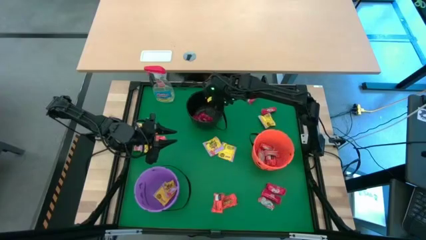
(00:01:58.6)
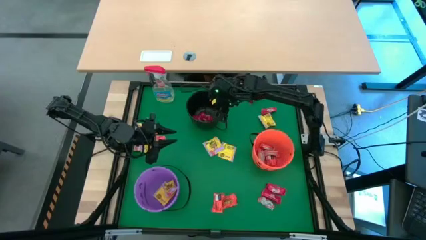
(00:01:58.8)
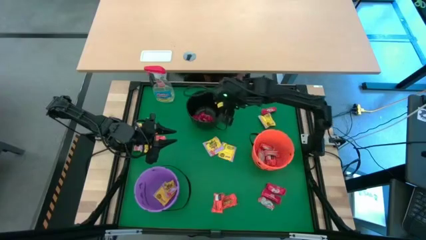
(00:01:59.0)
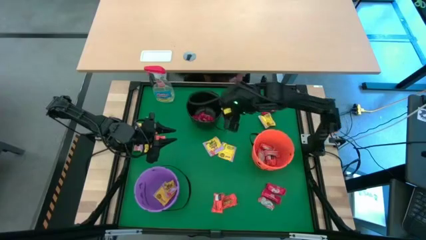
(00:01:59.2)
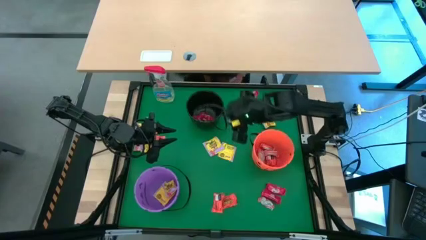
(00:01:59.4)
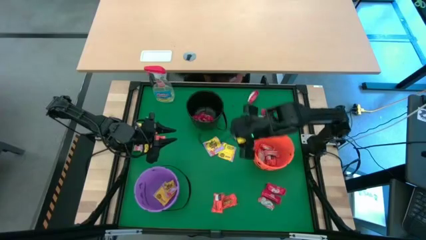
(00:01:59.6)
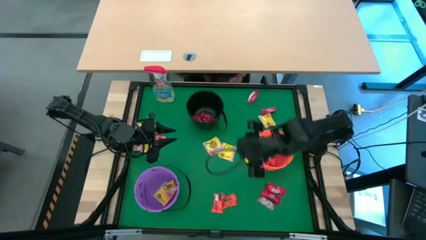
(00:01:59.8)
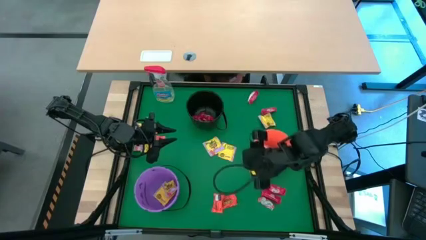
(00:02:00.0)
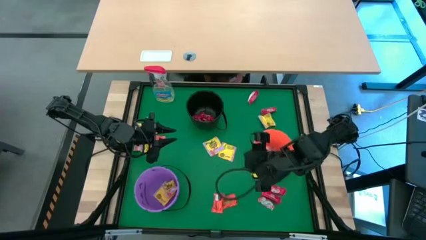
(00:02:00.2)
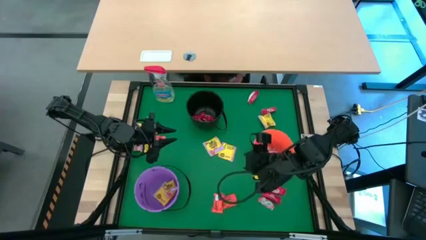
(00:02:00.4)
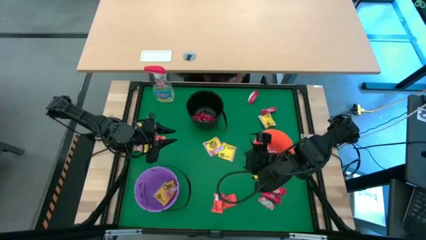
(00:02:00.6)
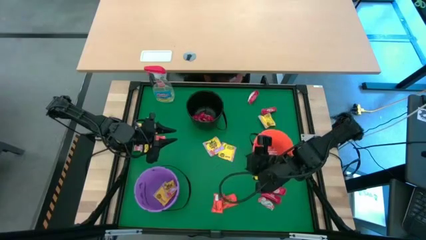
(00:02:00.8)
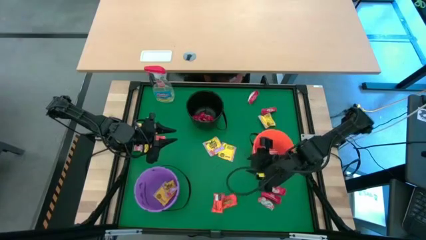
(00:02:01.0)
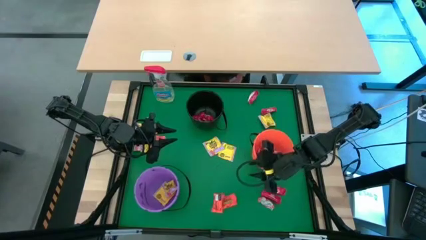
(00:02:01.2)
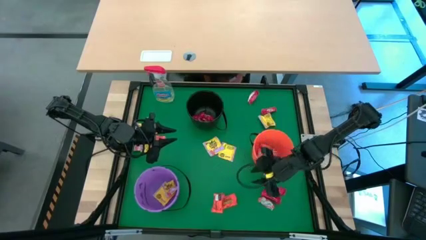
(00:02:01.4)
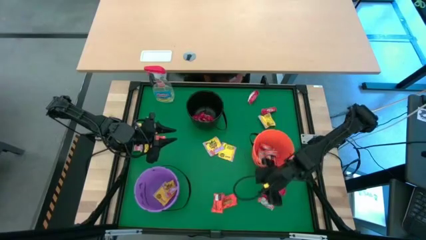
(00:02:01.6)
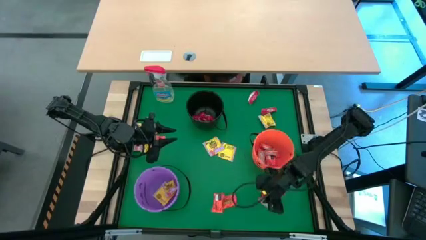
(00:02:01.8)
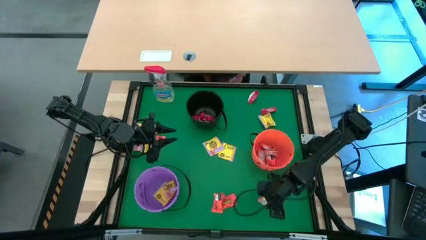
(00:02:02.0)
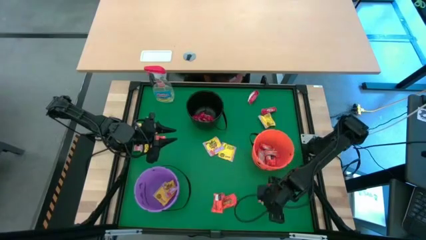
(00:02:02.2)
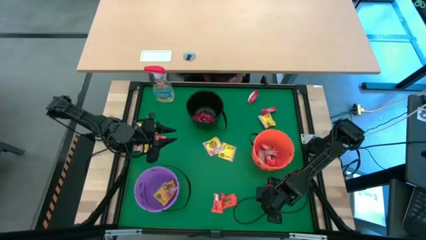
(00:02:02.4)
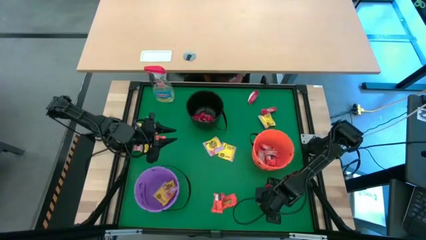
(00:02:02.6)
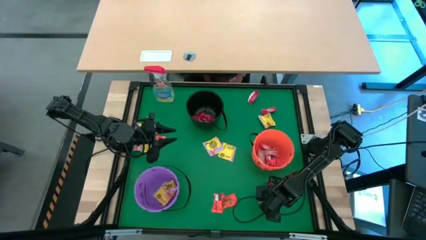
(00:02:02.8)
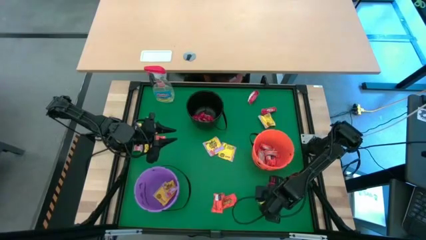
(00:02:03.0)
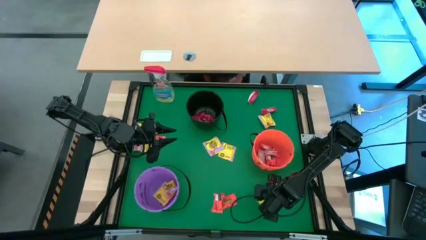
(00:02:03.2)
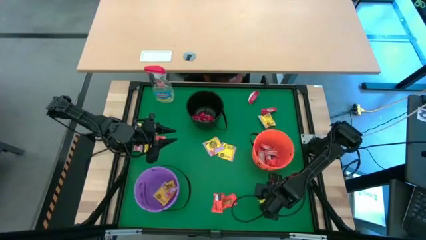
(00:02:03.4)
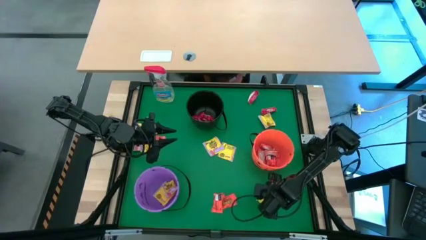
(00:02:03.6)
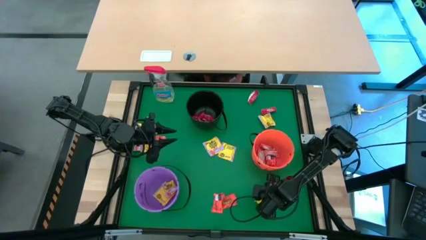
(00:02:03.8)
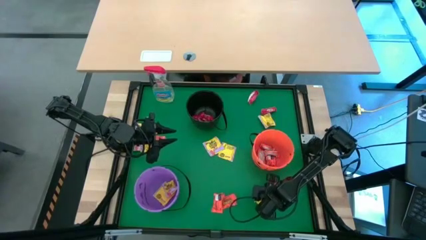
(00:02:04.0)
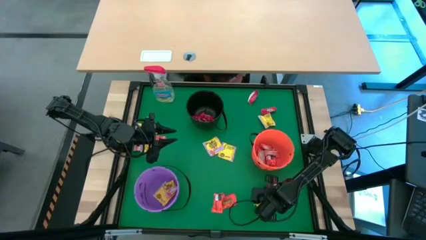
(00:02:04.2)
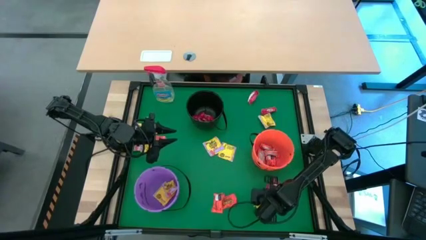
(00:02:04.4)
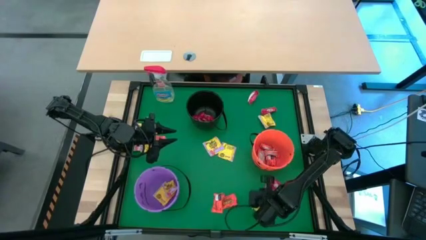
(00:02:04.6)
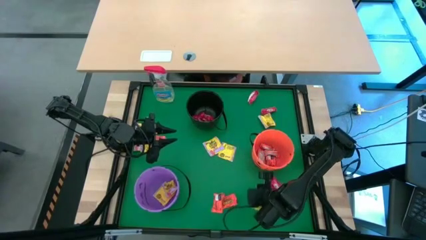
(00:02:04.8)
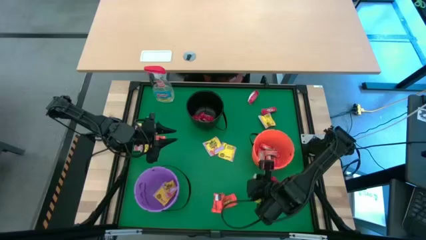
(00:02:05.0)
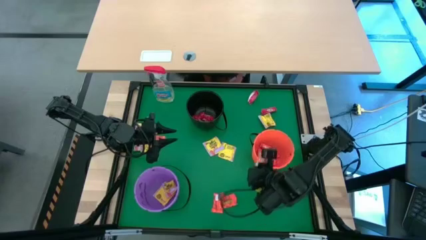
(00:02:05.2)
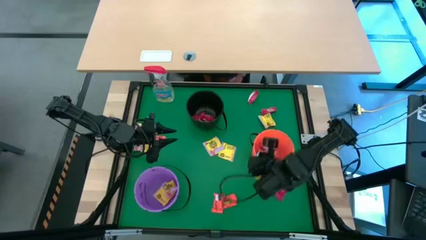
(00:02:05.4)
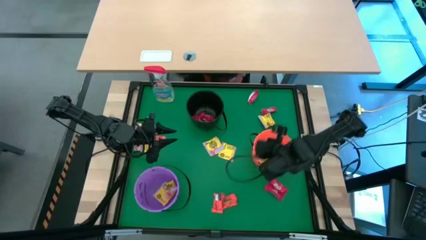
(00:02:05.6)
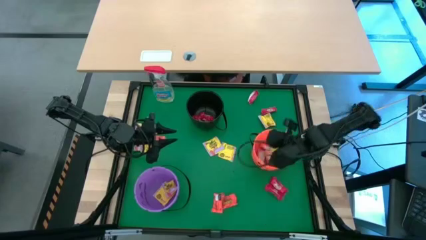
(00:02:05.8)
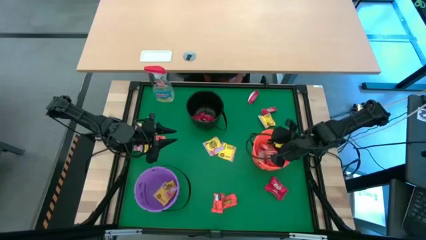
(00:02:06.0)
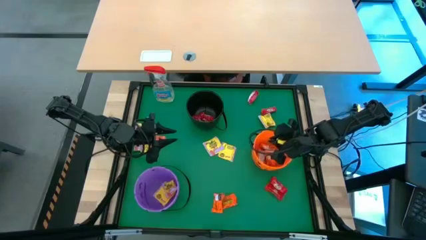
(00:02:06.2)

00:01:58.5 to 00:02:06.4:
Task: Sort candy
Put the orange candy into the orange bucket

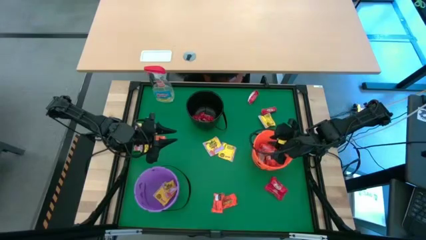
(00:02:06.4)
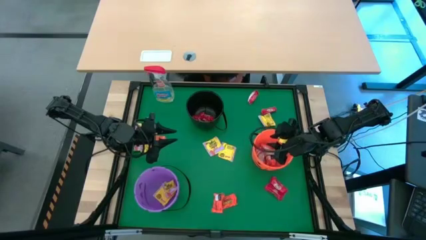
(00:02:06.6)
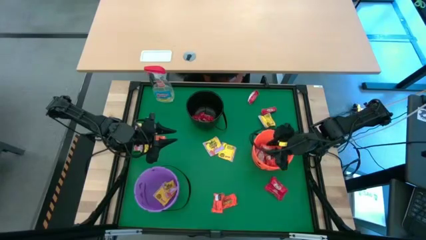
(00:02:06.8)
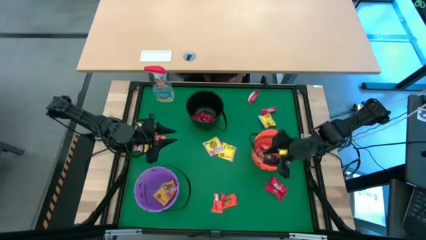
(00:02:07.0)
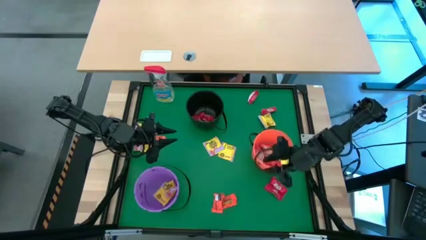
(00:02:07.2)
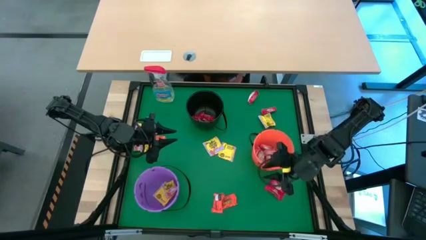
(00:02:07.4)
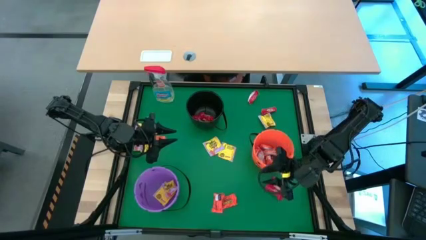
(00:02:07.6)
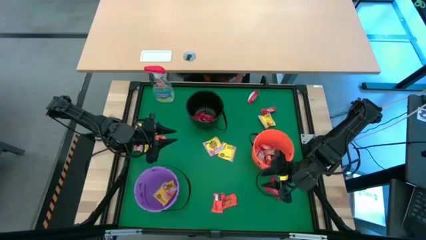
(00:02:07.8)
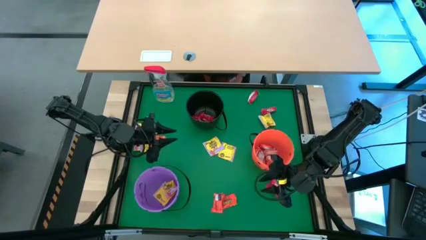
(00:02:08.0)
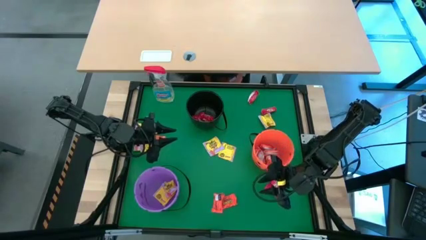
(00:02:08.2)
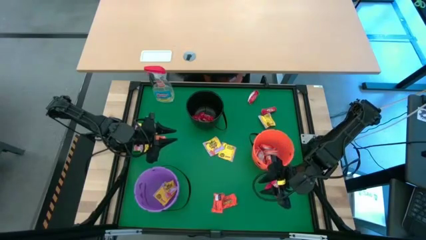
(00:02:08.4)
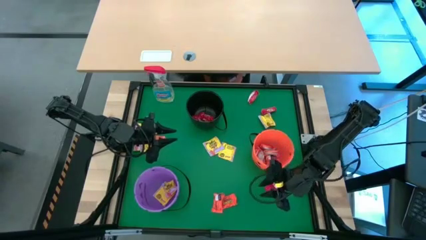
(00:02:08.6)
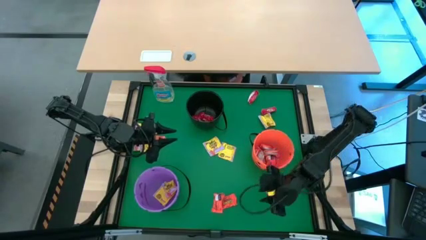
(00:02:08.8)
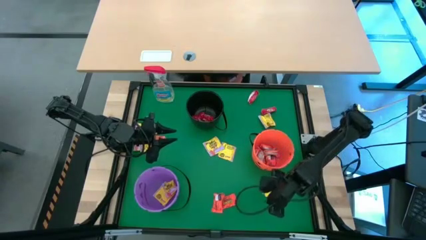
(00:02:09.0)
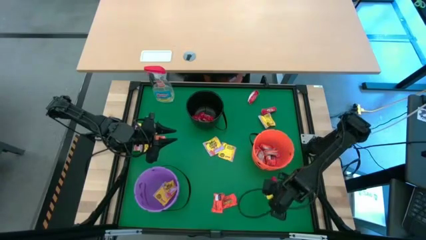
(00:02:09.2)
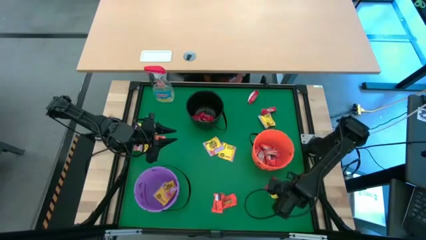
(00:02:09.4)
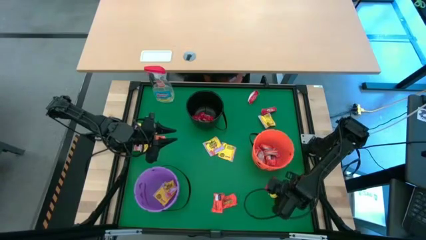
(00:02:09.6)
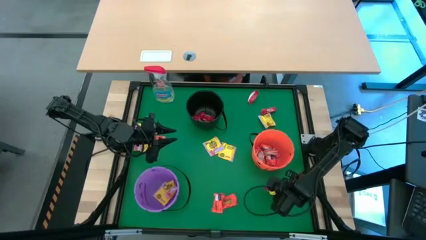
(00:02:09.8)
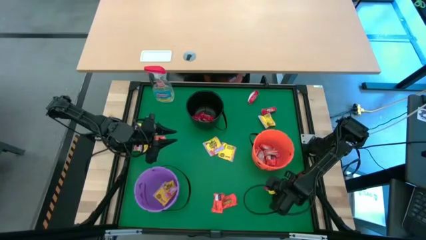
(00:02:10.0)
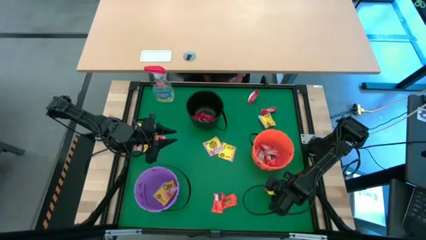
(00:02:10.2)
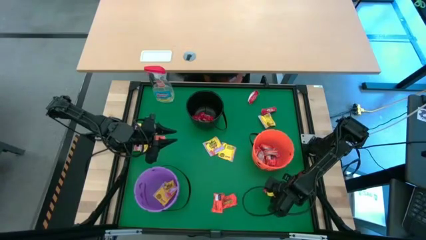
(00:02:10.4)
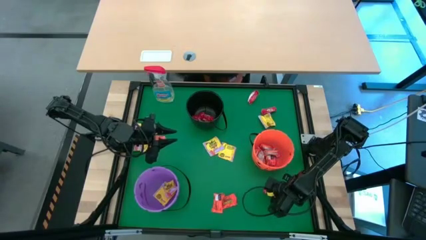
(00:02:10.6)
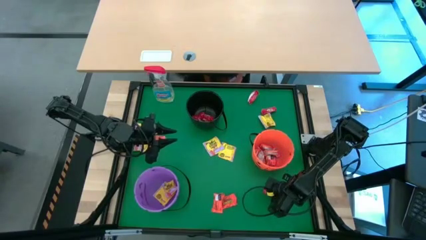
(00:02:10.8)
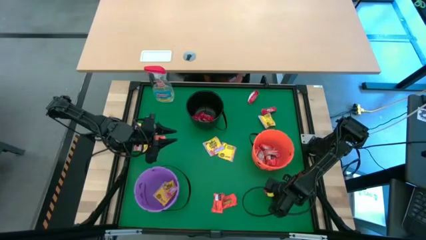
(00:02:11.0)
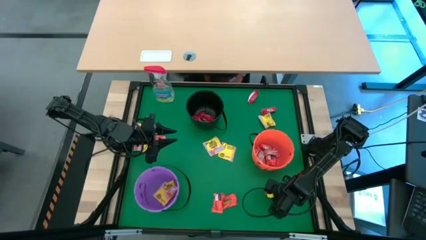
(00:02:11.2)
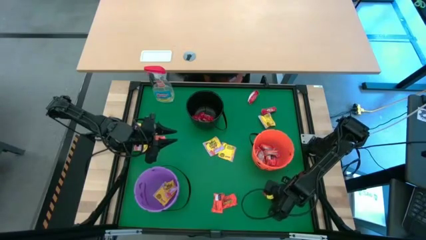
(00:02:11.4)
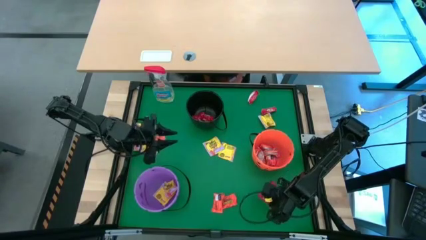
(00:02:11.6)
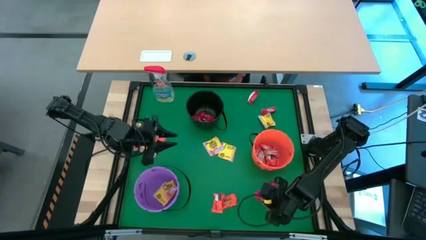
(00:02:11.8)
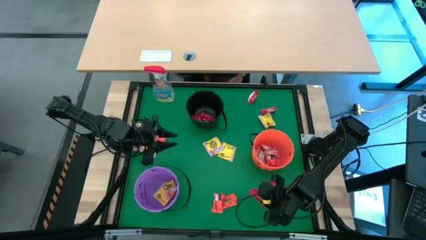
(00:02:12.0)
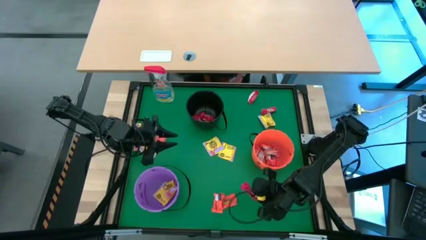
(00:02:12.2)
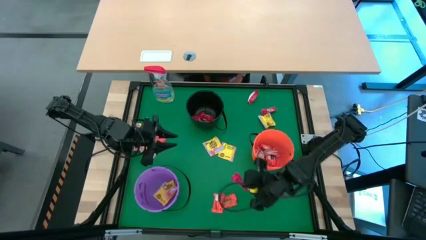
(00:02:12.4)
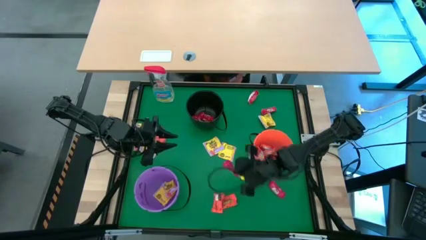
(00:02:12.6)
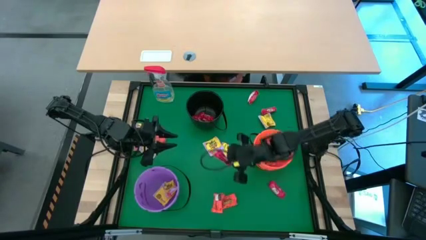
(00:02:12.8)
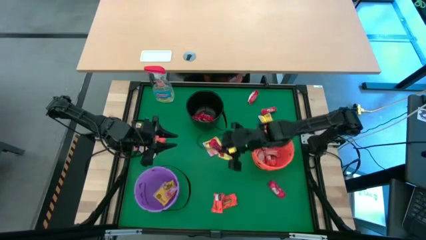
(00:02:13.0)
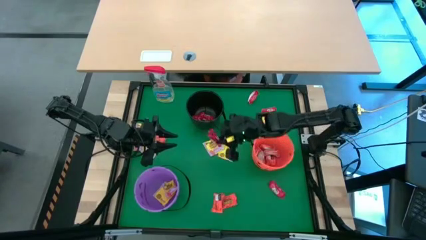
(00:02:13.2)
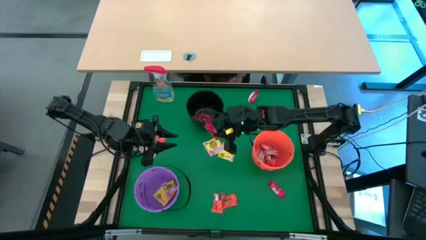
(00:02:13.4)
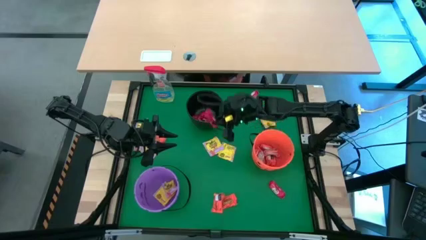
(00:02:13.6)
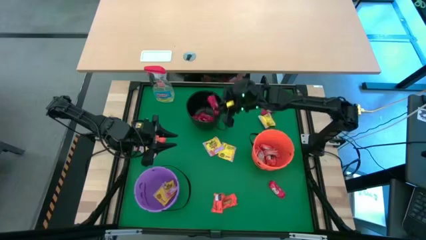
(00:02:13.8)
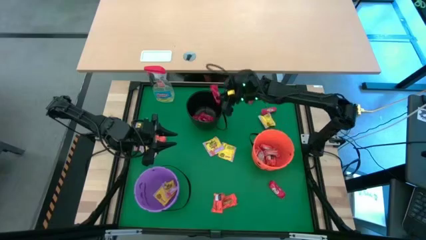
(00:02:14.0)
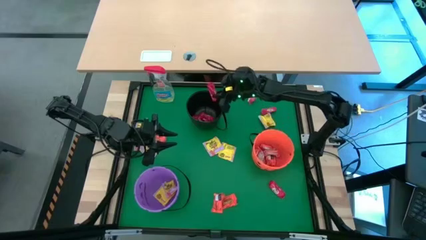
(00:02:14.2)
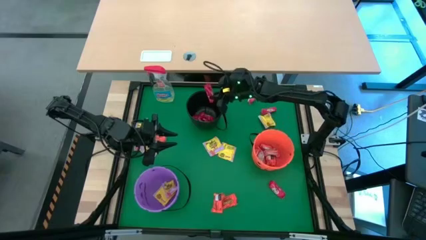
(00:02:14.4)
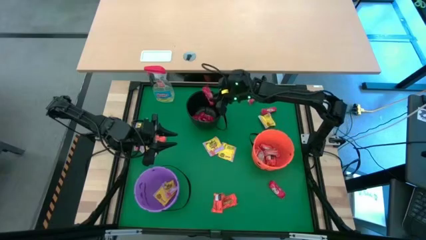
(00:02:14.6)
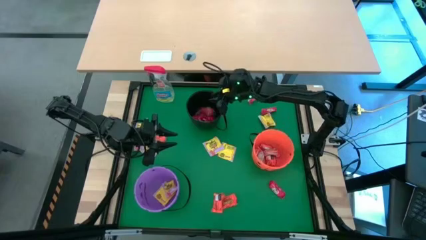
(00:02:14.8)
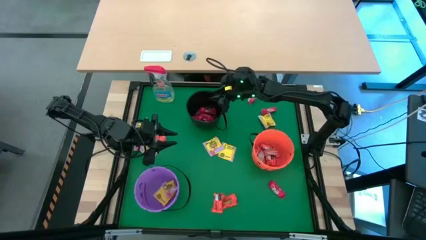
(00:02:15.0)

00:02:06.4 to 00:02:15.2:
Put the red candy into the black bucket

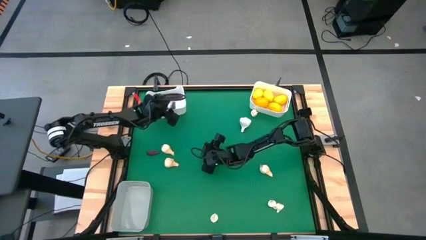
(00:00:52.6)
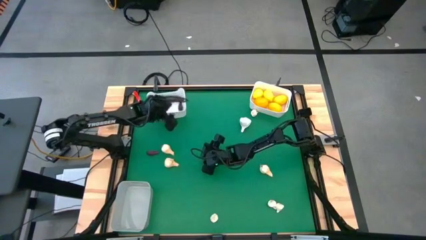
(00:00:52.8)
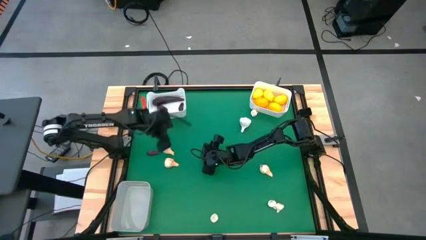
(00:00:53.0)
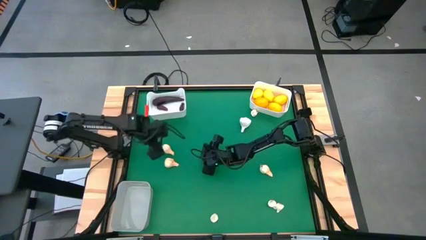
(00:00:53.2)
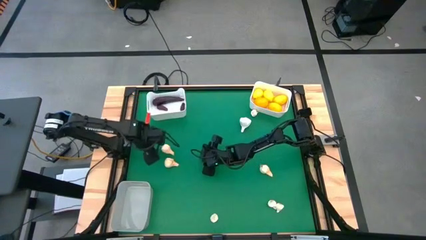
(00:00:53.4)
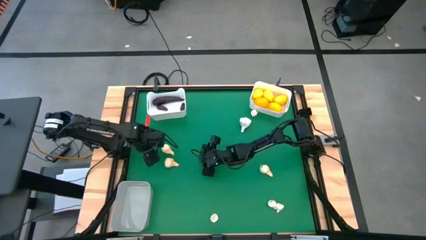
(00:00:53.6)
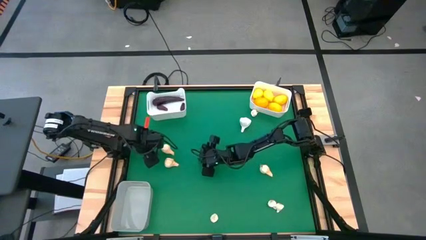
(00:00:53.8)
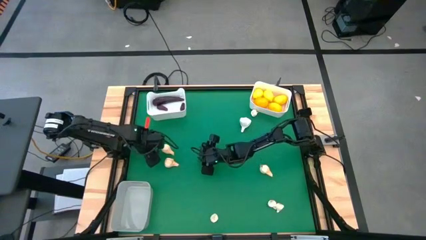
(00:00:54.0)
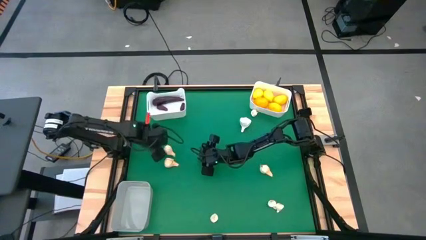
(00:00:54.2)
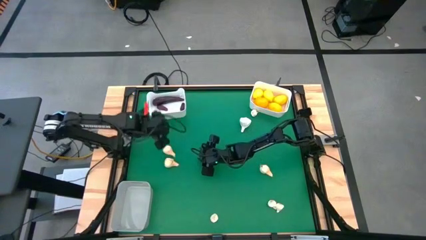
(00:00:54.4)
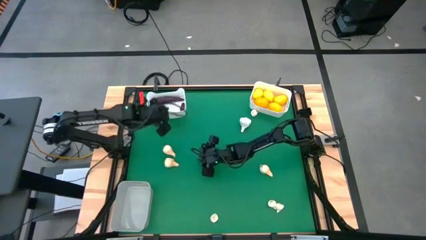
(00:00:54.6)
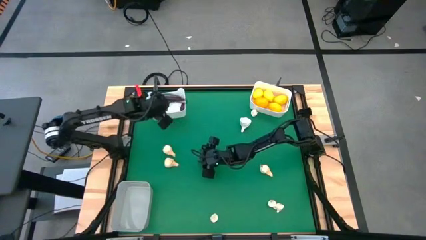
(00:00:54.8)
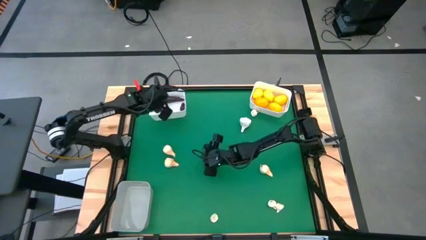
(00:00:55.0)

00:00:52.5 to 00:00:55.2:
Task: Sort produce into baskets
Put the violet eggplant into the left white bin
